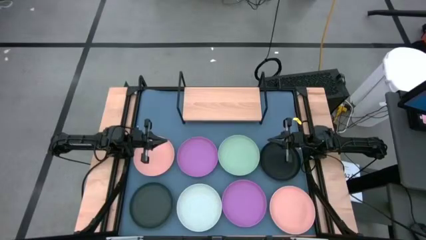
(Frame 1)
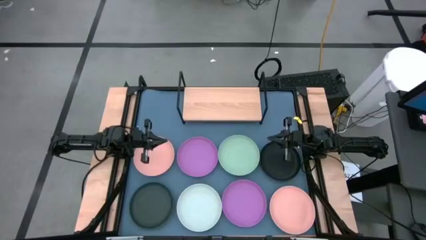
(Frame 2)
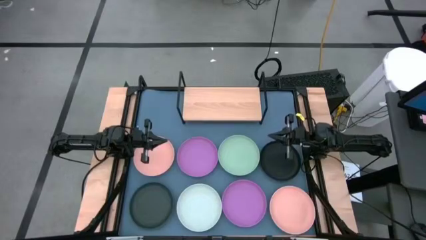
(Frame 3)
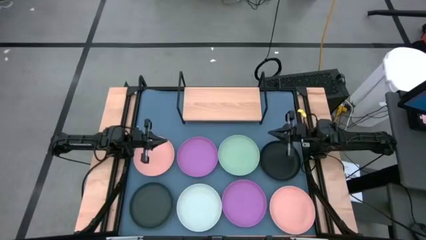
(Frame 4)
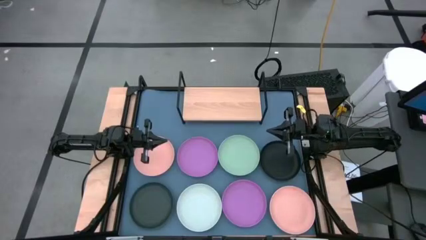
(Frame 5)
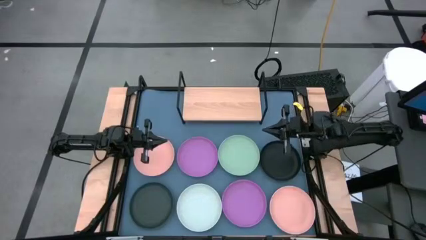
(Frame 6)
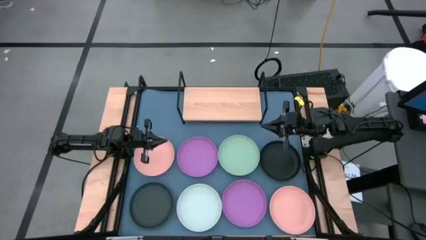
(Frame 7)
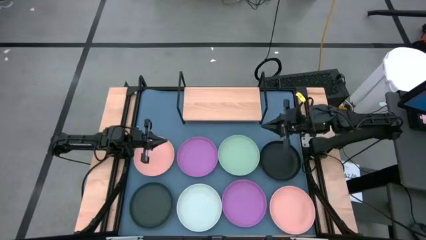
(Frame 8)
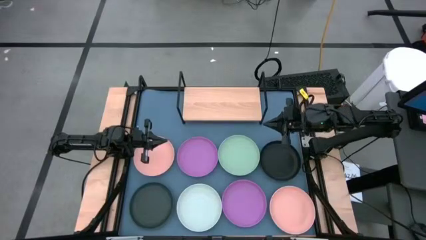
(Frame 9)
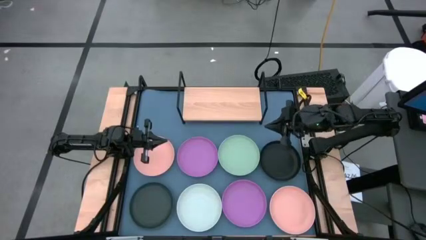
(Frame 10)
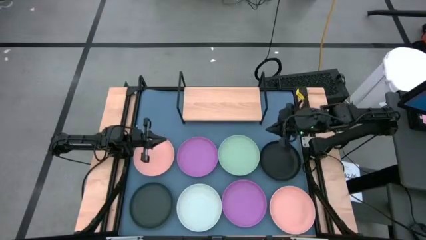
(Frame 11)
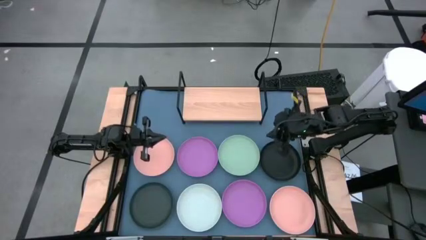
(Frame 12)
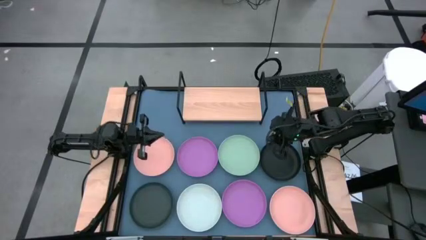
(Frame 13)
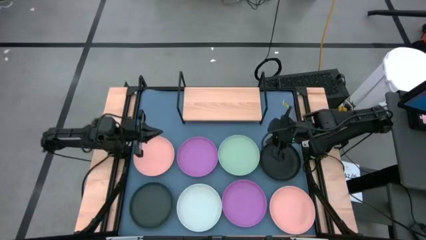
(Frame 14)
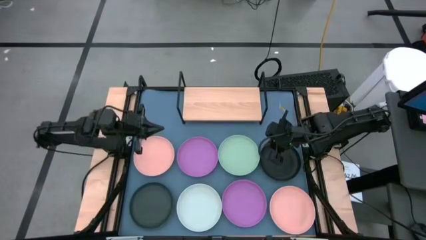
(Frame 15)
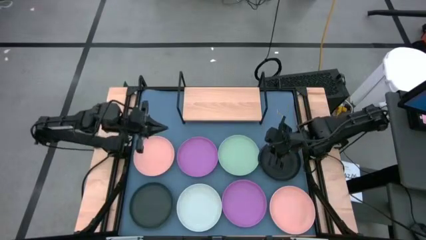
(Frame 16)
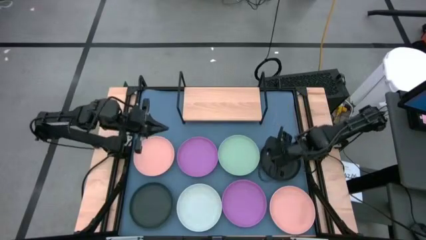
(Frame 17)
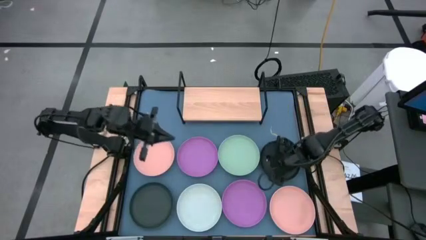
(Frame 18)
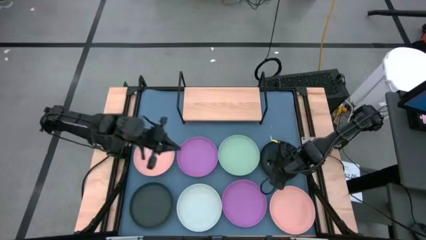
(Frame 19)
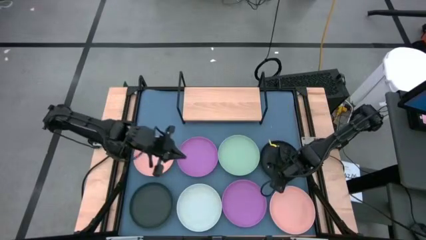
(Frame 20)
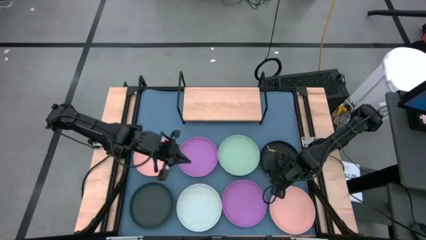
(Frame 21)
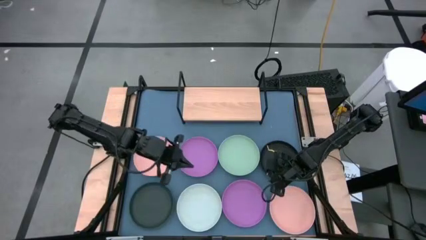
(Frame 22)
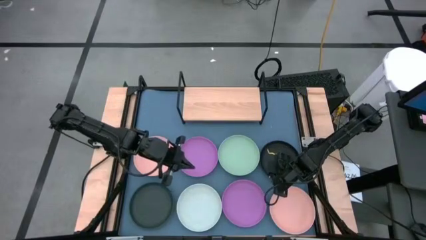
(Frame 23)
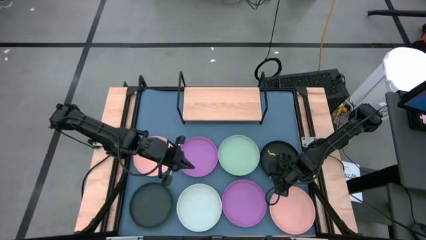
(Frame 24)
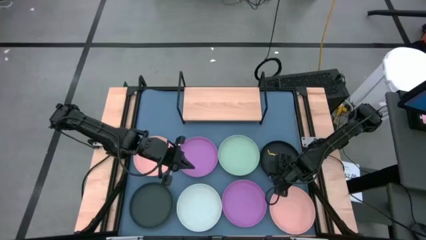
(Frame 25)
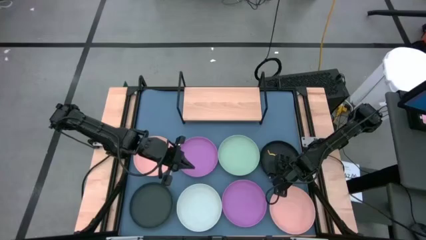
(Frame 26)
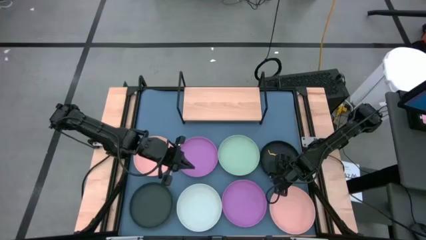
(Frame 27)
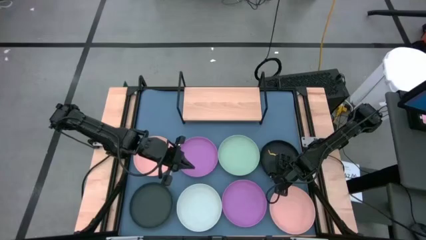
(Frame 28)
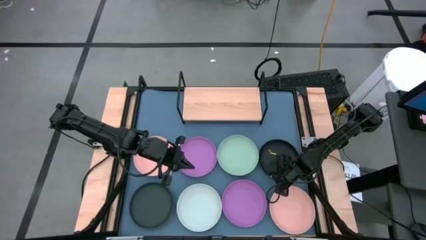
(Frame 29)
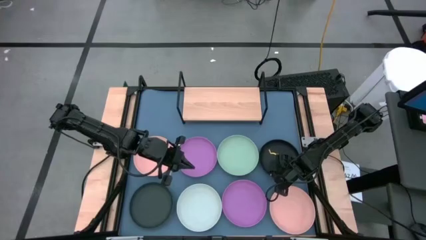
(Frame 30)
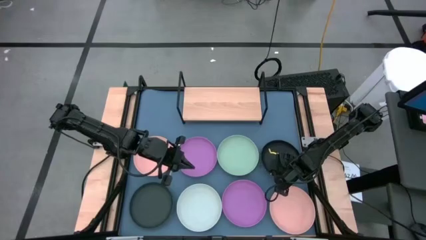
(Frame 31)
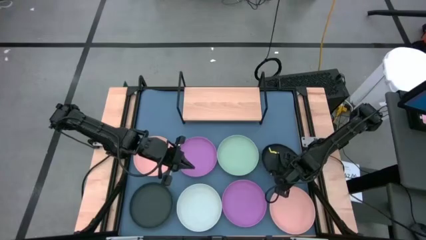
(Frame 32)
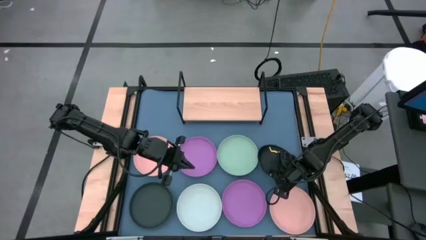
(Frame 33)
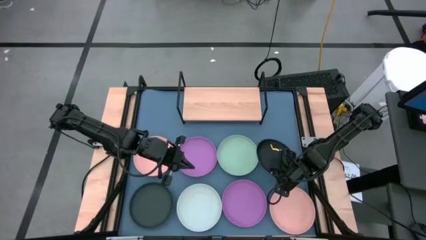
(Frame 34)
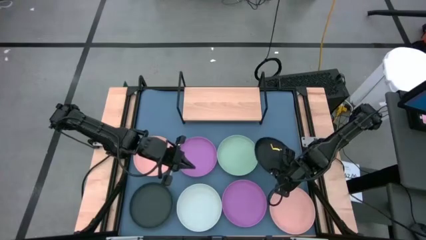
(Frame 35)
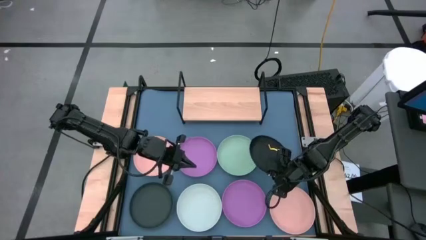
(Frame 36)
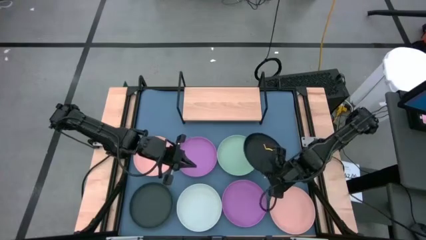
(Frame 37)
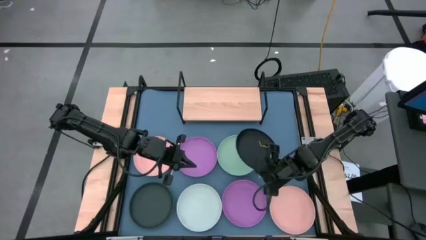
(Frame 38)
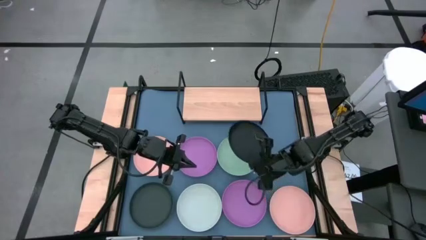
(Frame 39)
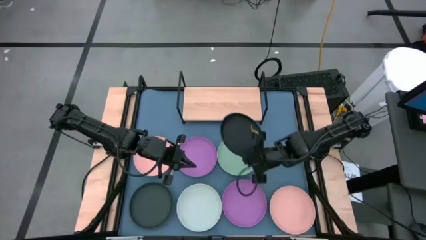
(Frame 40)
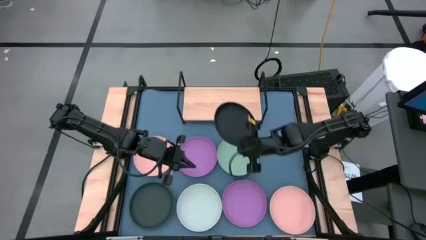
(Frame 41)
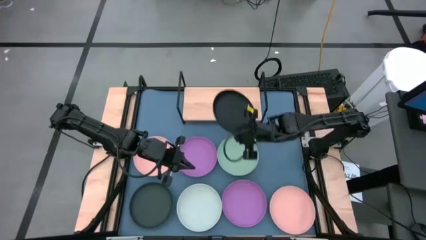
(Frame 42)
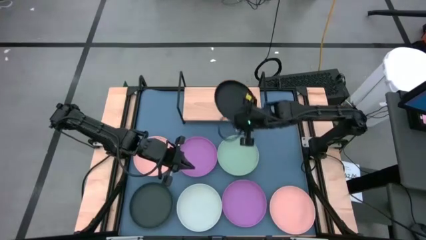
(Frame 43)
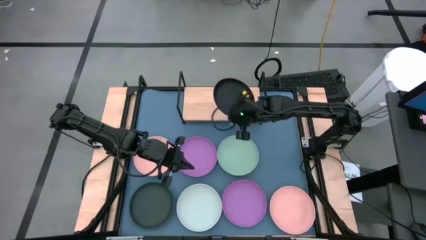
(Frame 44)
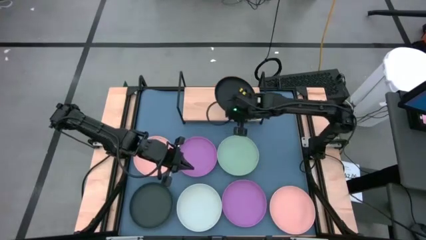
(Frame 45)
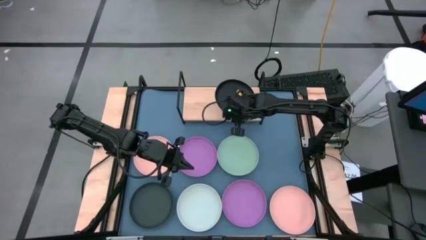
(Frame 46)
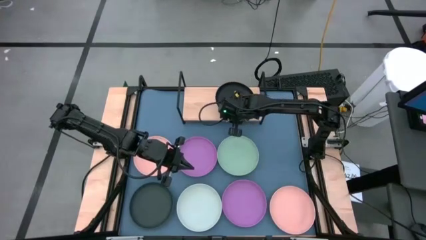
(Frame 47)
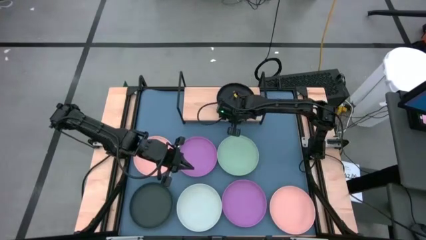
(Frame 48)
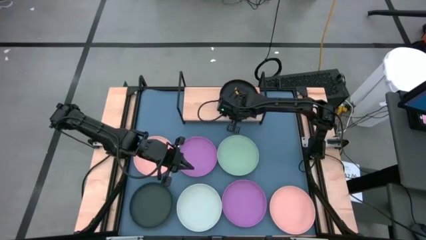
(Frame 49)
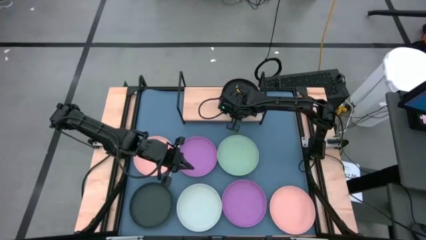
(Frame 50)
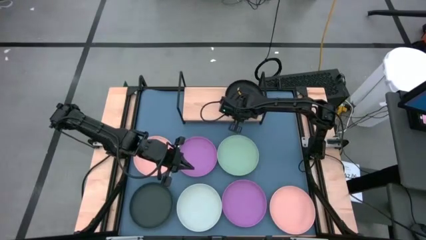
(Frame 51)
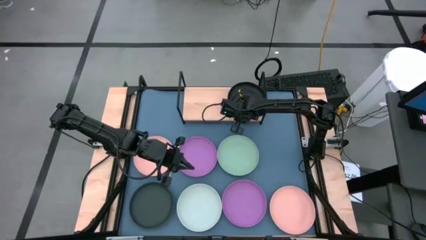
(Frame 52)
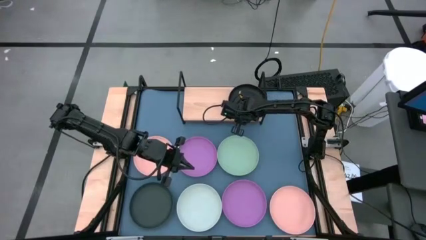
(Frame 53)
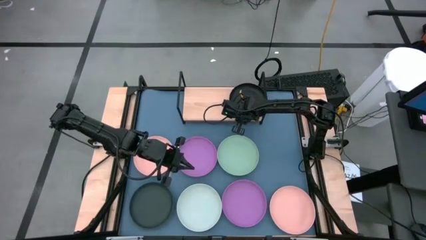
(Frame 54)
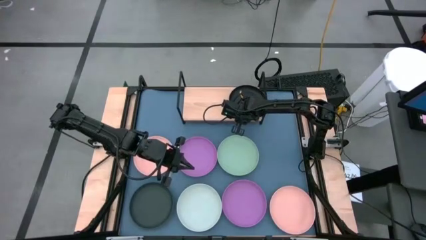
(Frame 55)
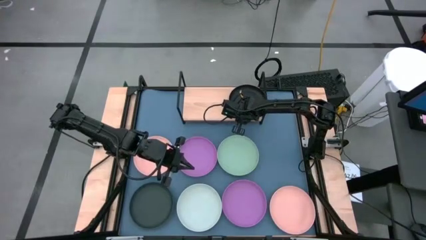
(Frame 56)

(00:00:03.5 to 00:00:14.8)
Task: Place and stack plates onto a shelf
Put the black bowl on the shelf

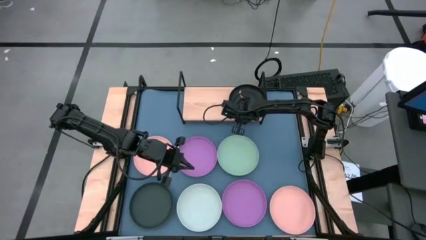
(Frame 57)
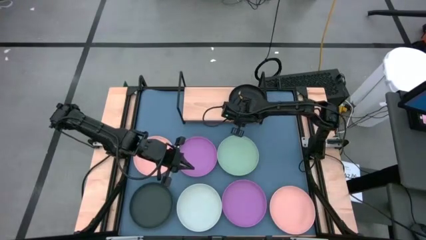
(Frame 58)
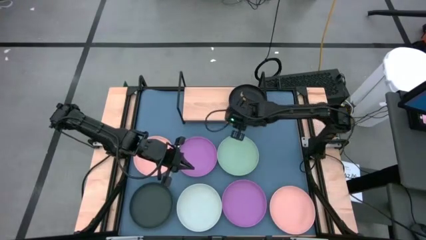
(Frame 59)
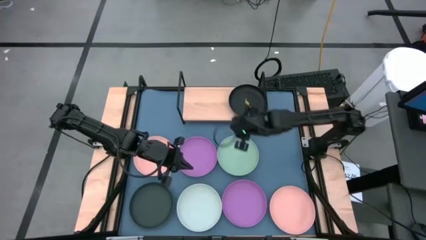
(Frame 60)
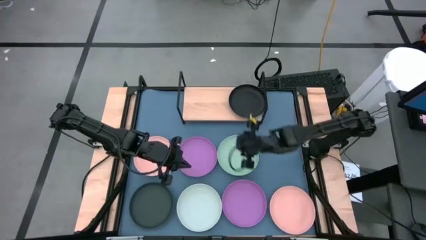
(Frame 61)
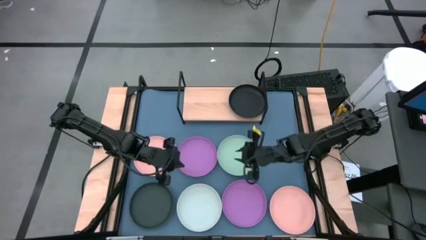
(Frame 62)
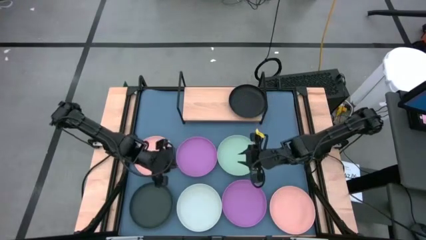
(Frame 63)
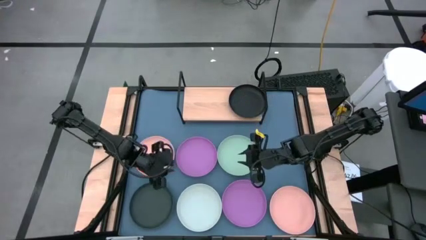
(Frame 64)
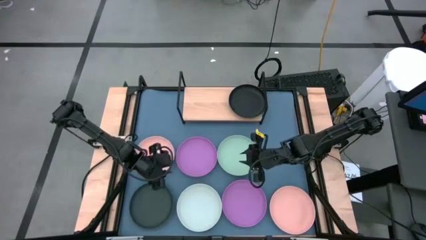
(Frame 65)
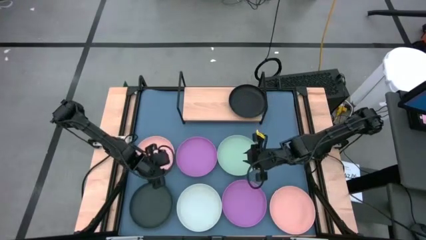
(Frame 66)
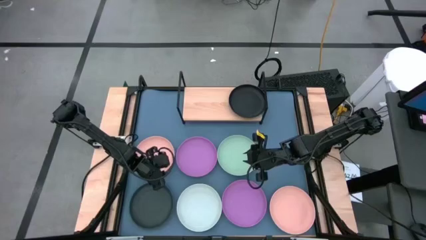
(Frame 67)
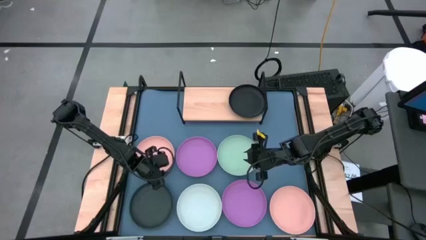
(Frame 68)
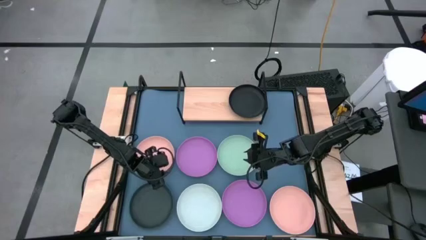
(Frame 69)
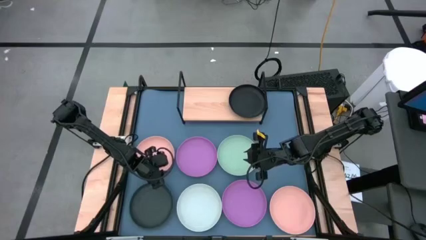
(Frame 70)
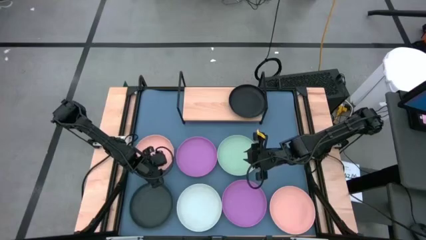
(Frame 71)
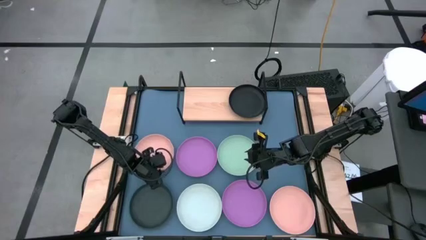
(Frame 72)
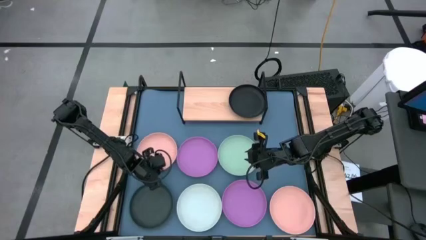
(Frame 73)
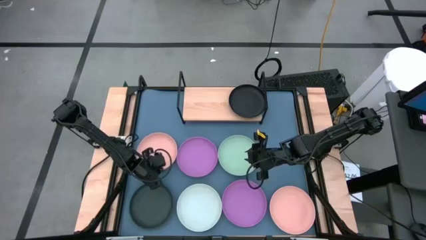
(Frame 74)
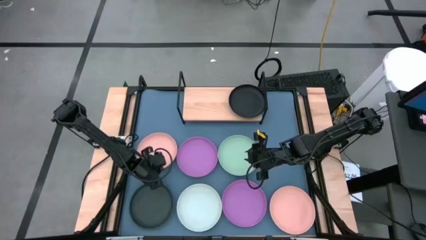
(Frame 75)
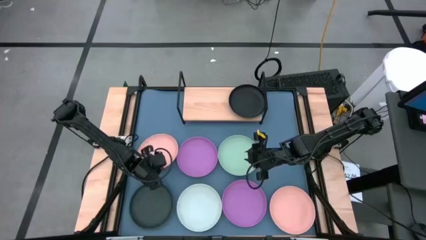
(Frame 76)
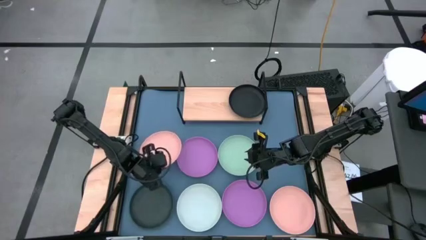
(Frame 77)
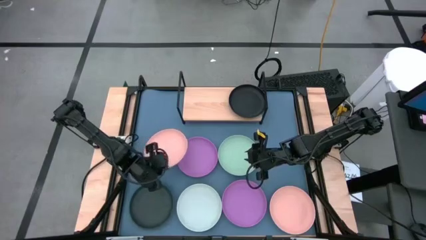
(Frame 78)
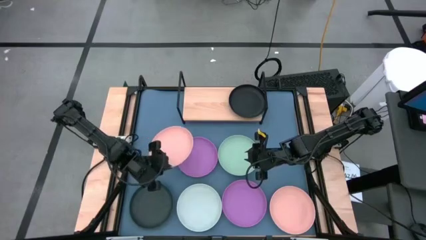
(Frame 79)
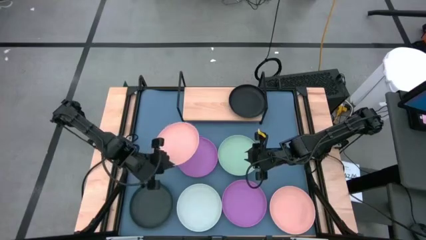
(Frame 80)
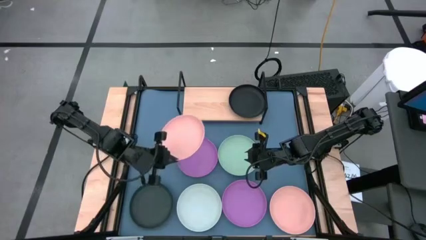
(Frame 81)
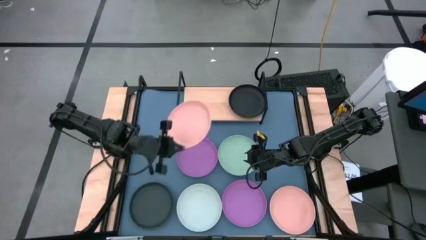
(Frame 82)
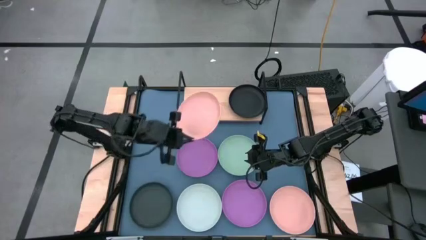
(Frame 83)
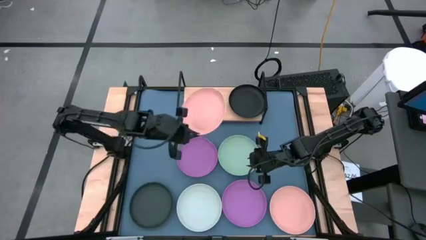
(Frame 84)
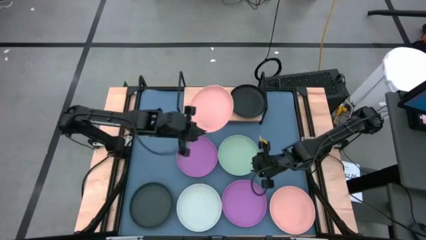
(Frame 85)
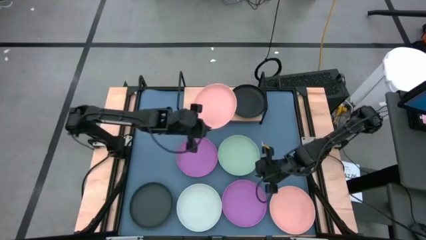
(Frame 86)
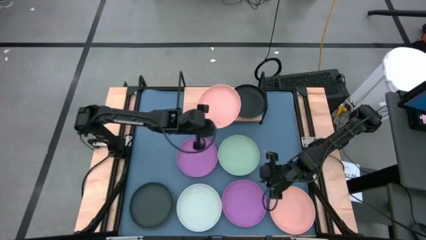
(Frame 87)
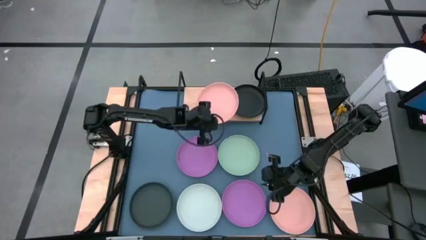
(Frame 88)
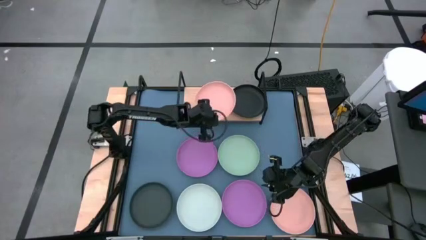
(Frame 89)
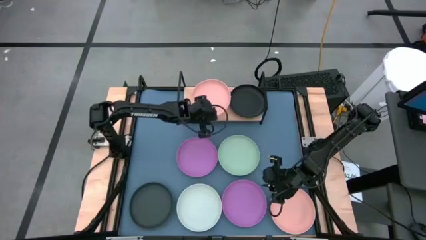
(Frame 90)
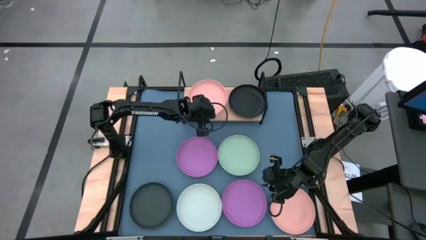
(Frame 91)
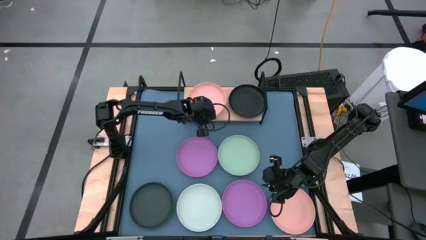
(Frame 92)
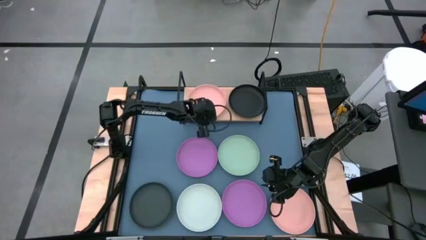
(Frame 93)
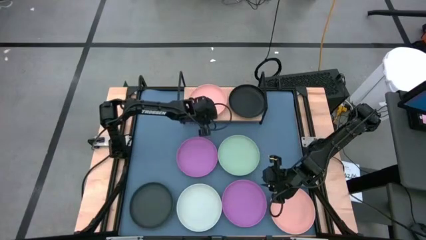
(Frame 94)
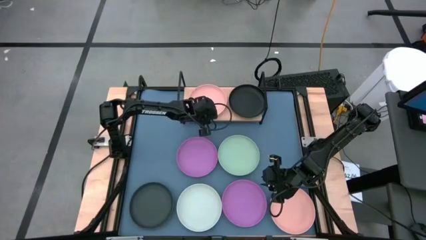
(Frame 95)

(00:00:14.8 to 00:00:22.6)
Put the pink bowl on the shelf
